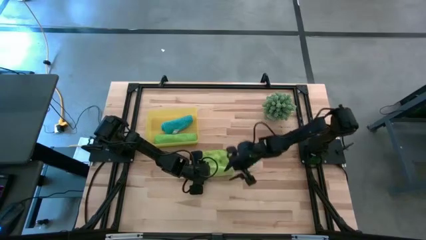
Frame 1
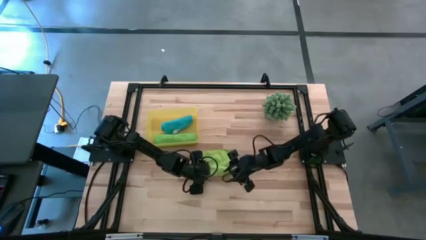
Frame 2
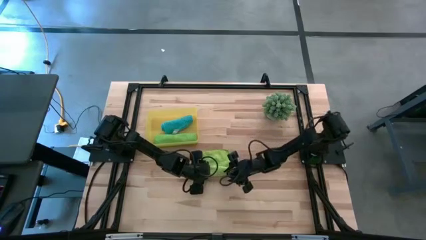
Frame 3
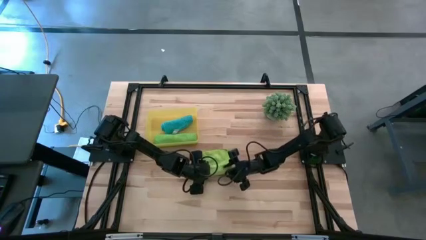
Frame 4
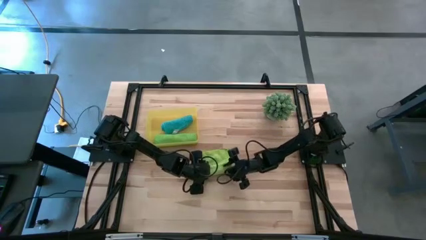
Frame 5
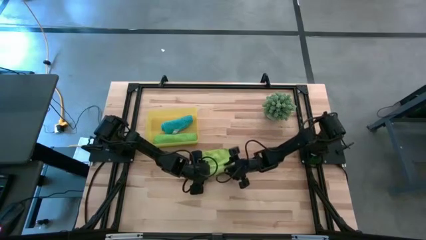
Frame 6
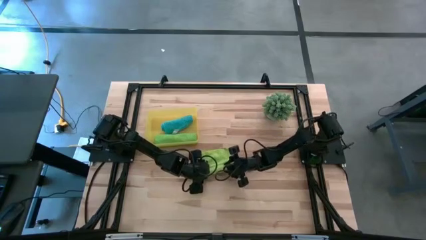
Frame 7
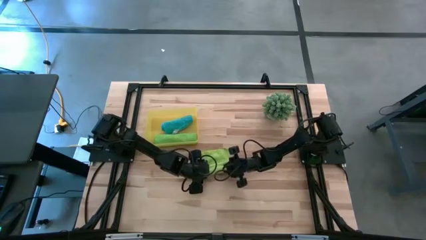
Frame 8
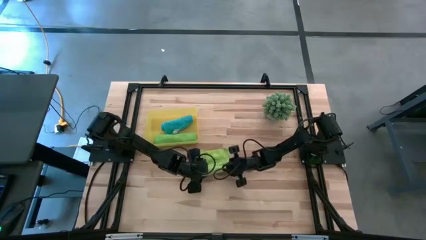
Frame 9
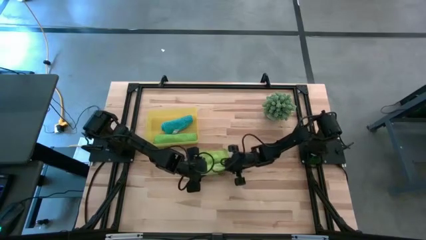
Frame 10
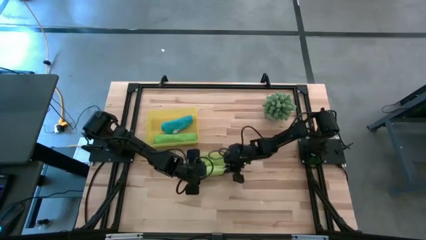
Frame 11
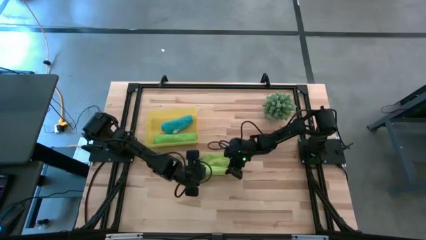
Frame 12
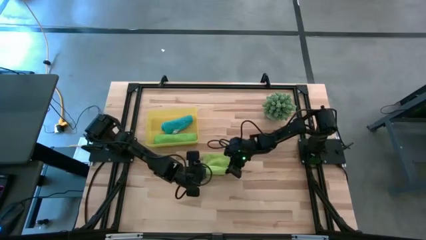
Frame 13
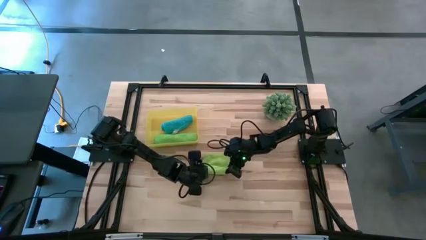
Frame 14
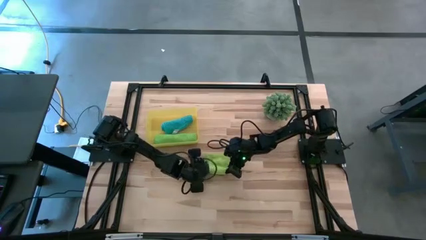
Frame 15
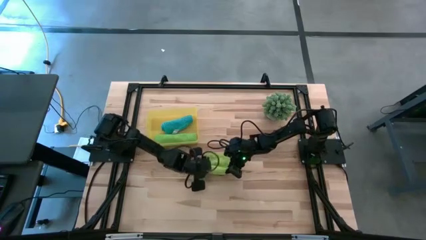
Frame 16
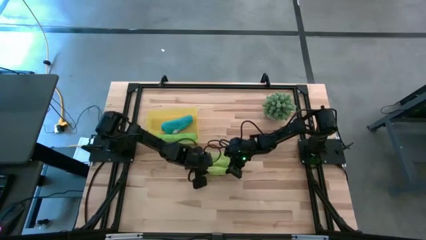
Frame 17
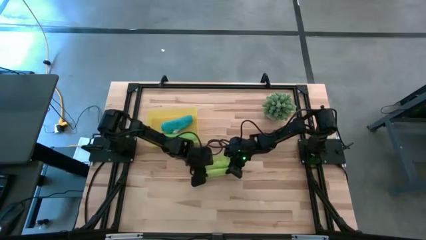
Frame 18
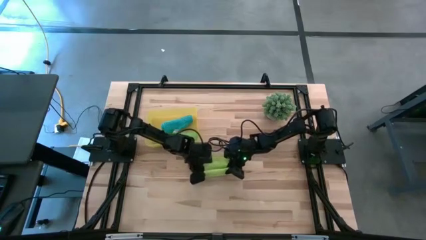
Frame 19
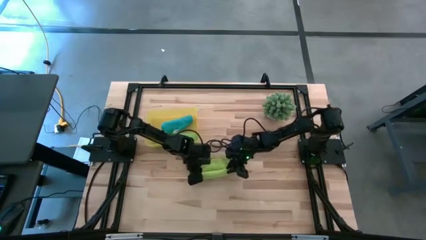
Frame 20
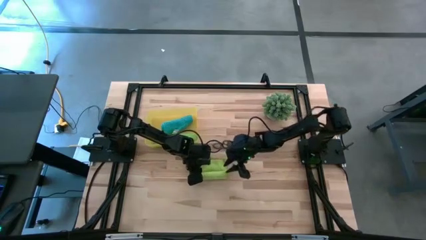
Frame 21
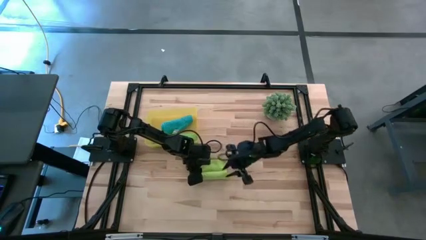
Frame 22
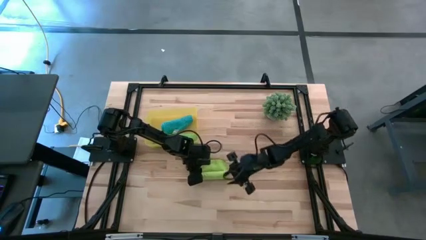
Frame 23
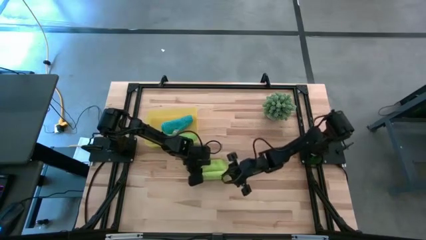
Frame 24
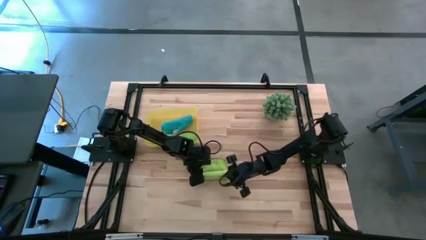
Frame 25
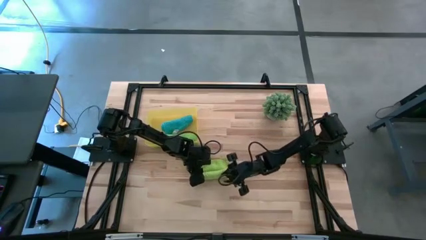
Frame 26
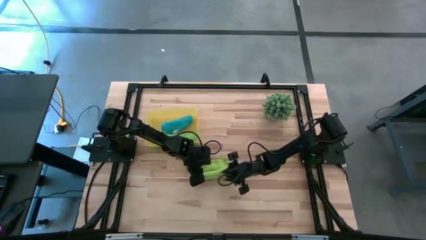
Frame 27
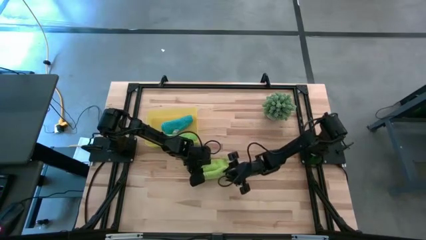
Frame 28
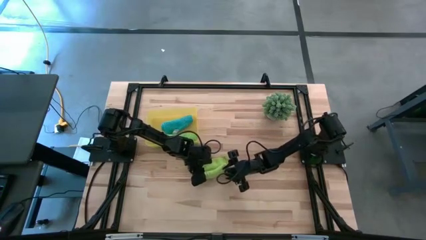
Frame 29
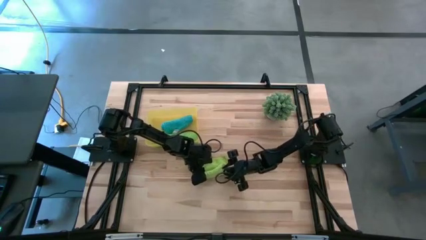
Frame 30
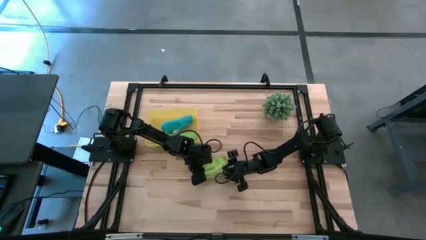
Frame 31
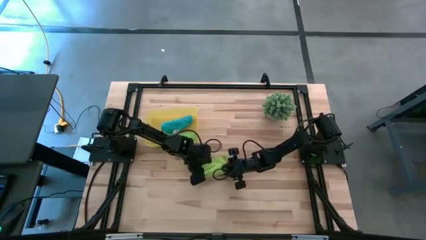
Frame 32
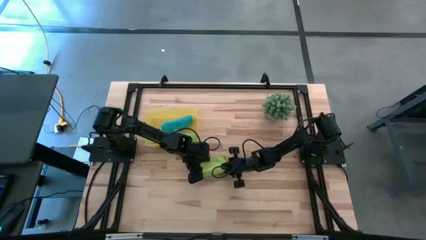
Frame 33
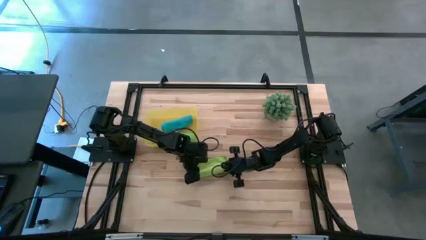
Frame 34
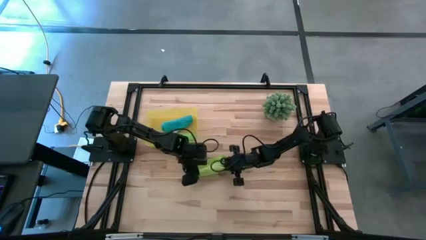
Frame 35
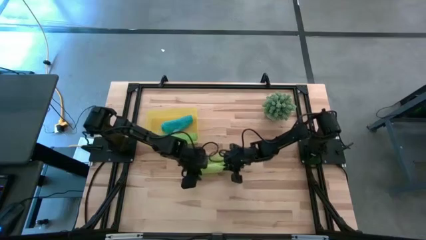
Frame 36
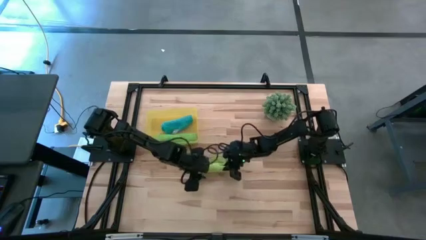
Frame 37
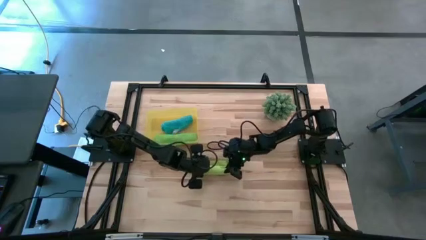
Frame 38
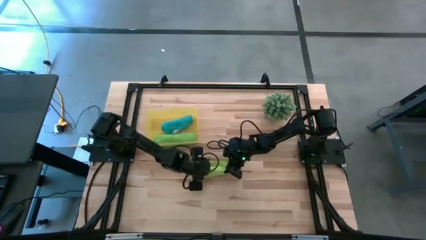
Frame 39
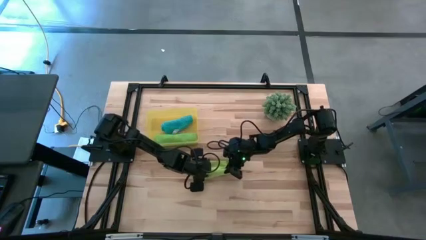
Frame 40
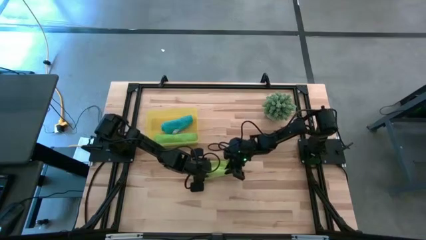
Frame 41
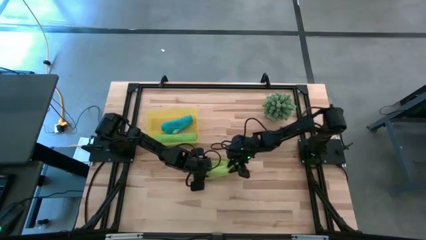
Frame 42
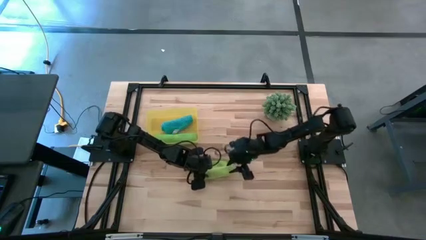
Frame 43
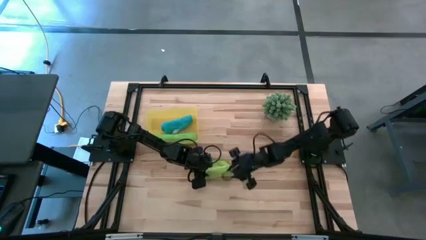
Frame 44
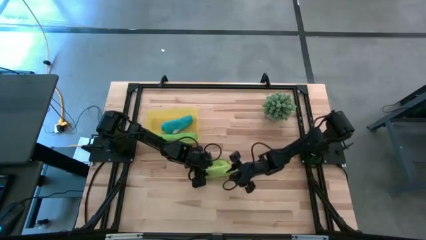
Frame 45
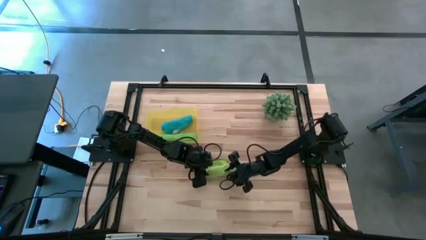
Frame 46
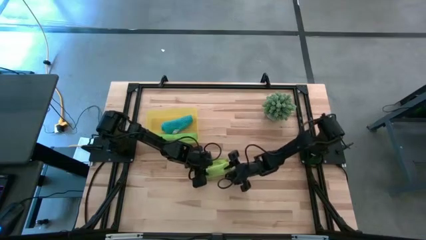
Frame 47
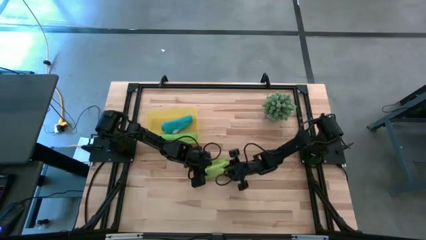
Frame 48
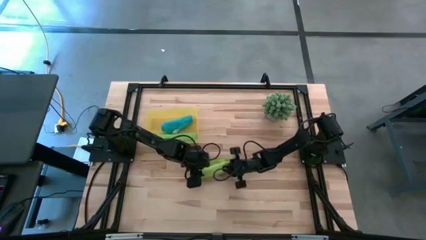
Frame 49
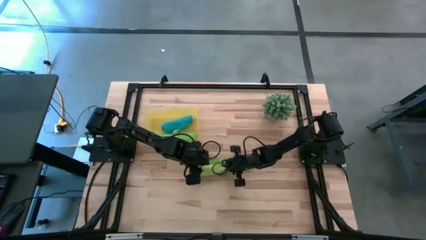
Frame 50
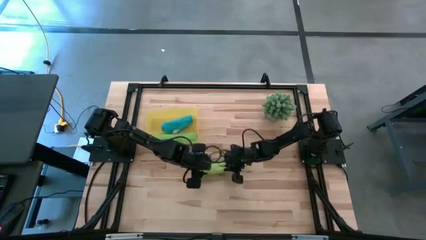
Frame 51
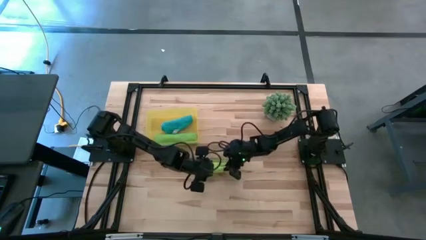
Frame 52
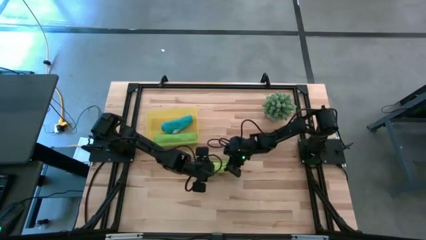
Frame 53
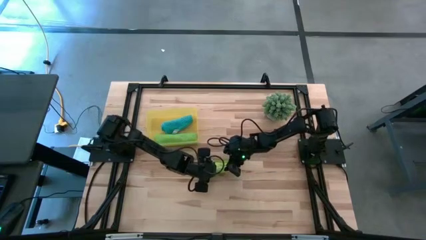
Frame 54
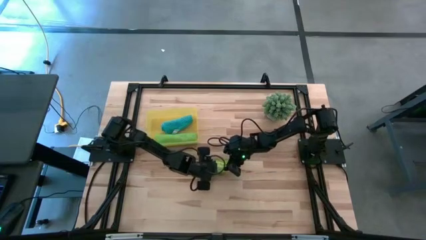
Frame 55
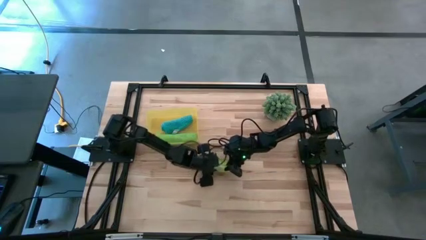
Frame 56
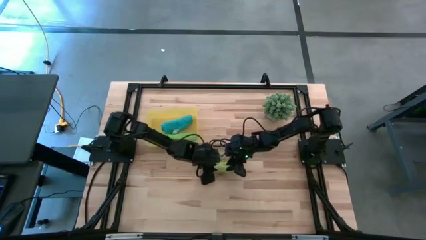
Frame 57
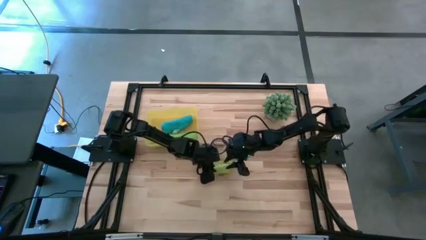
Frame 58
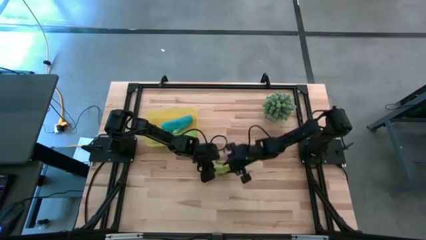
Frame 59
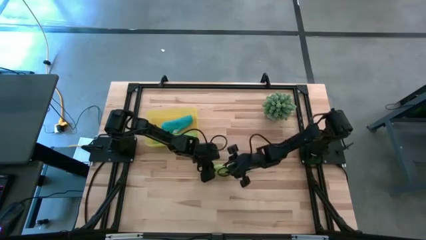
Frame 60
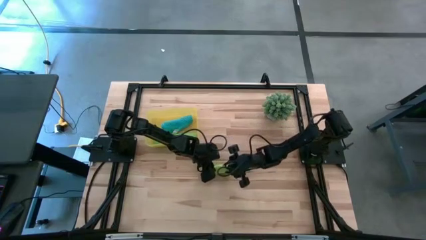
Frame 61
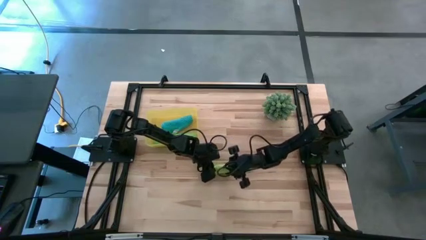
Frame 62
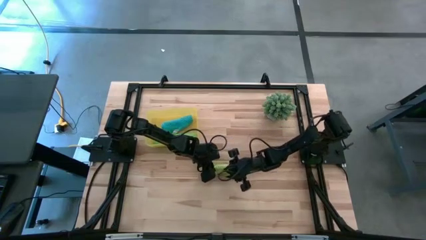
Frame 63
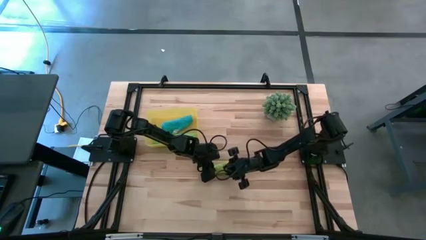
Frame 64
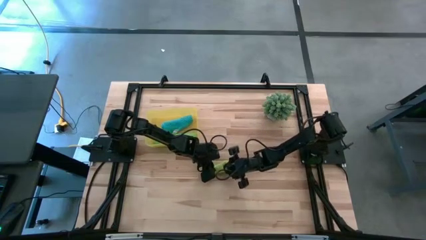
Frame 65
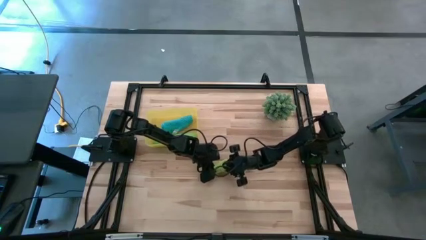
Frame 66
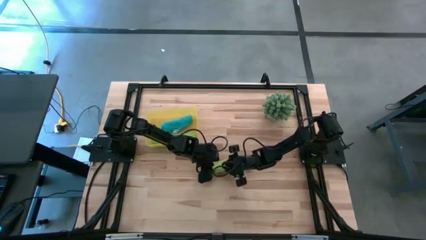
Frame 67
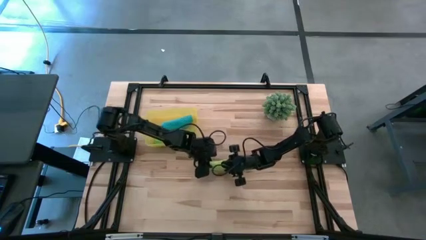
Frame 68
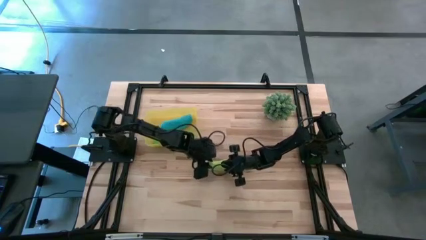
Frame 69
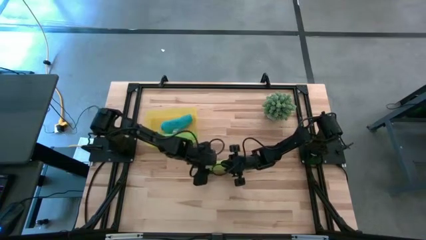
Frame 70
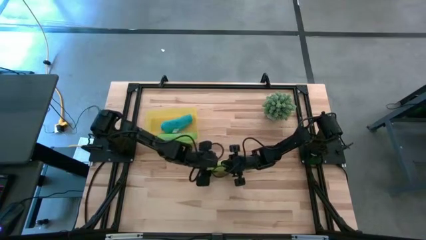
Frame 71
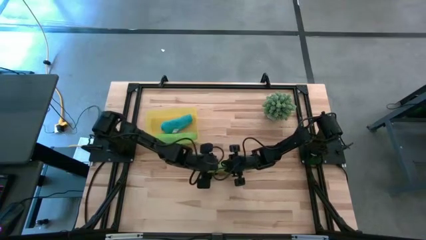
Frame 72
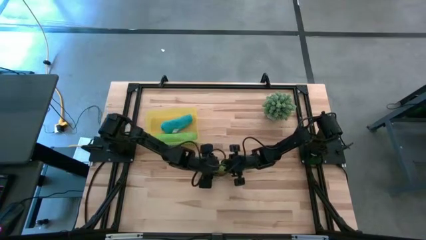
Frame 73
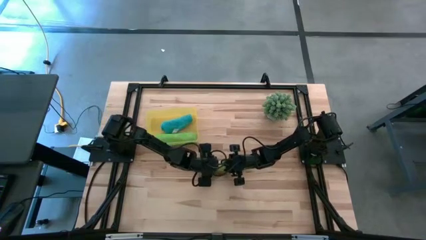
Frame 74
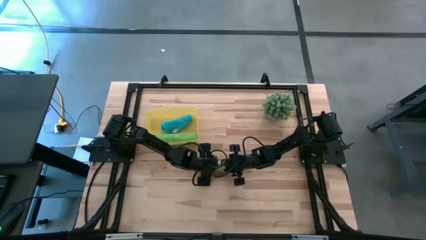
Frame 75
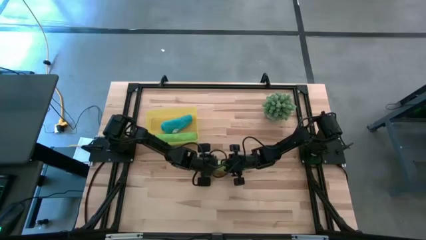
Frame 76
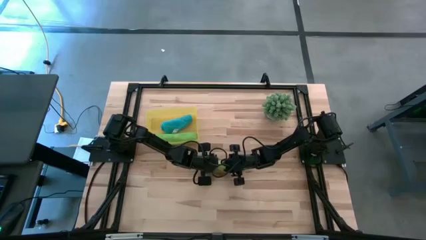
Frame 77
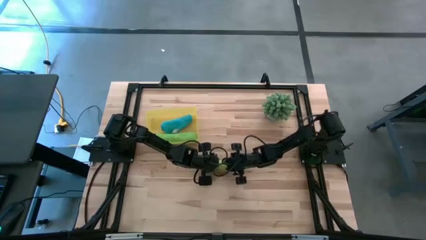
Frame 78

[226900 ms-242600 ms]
Task: Roll microfiber towels into tight, uniform cylinder then place into a basket
Roll the light green microfiber towel

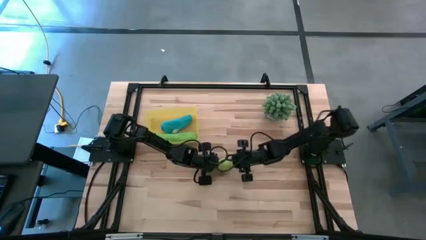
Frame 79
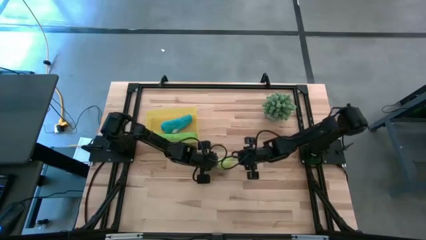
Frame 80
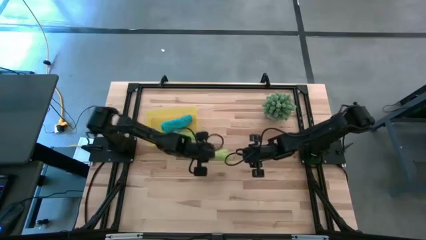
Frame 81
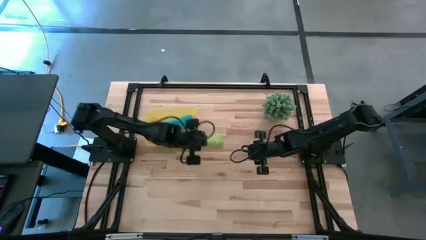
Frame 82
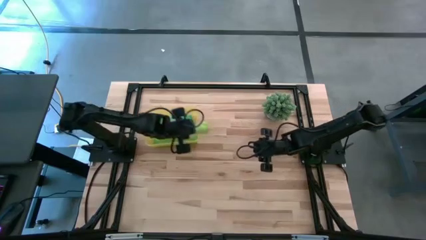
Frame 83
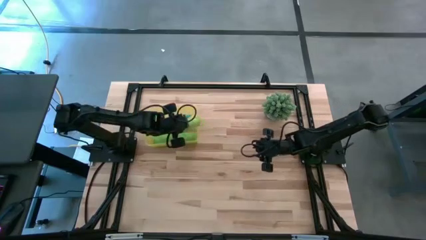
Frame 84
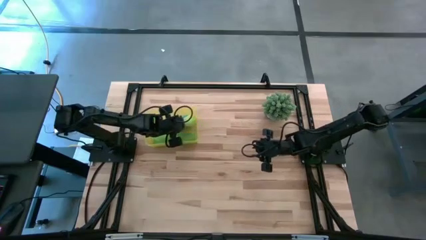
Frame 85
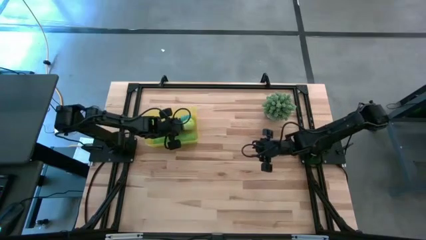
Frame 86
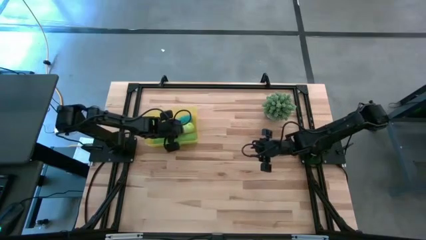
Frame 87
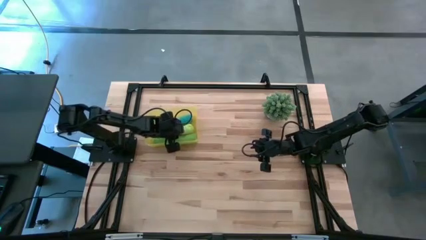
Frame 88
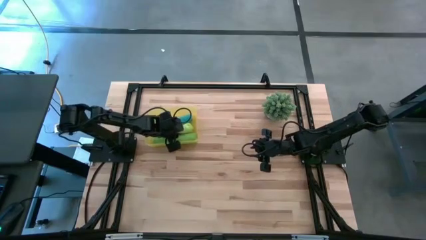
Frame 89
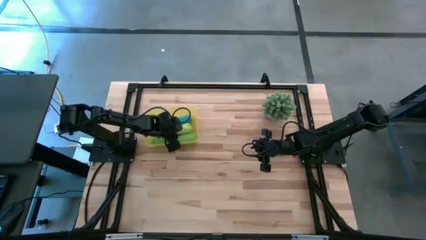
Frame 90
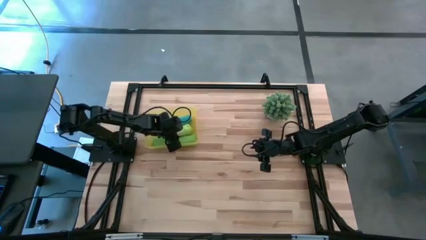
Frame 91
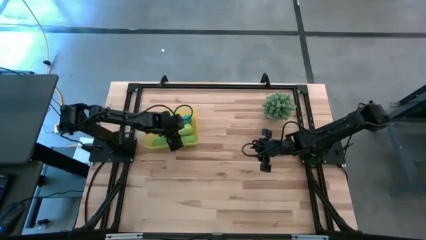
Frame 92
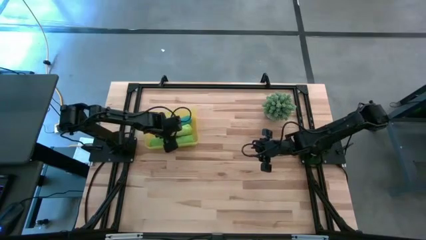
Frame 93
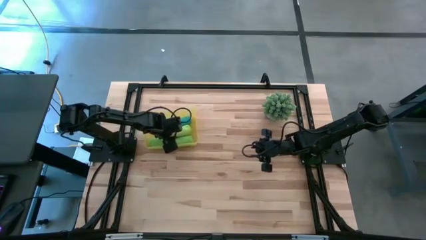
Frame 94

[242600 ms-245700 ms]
Put the light green microfiber towel into the yellow bin
